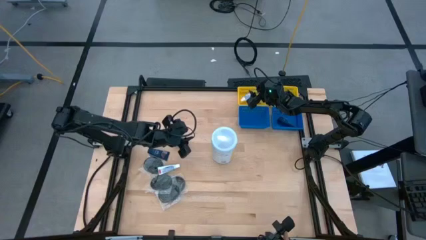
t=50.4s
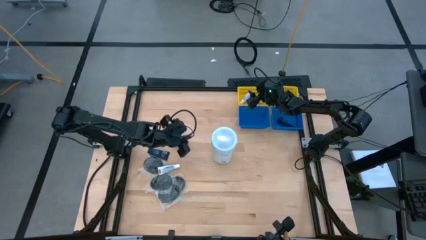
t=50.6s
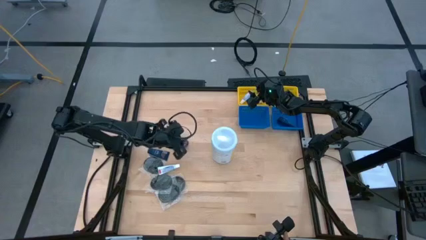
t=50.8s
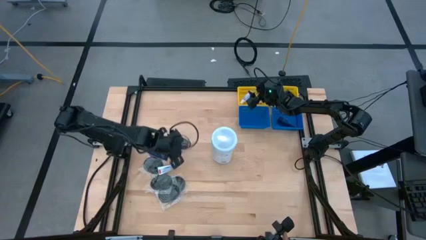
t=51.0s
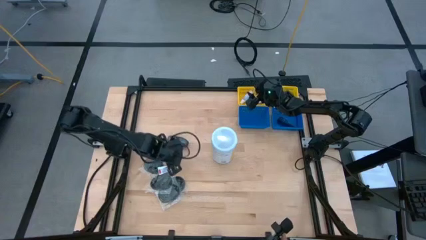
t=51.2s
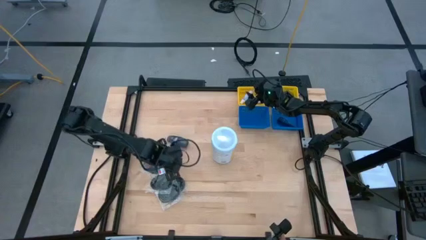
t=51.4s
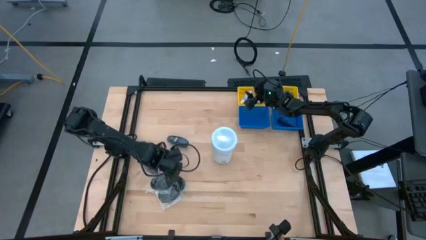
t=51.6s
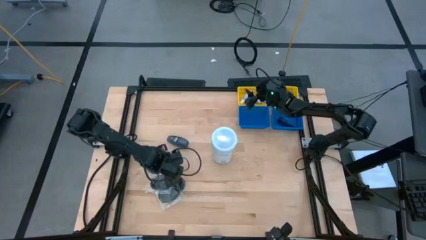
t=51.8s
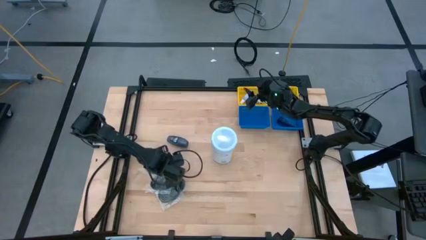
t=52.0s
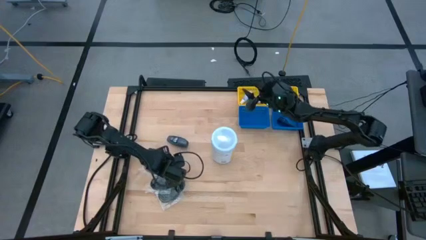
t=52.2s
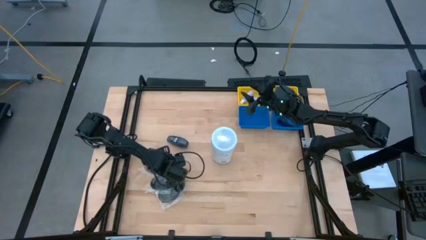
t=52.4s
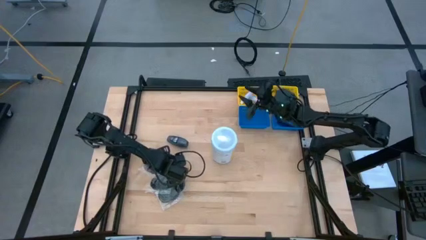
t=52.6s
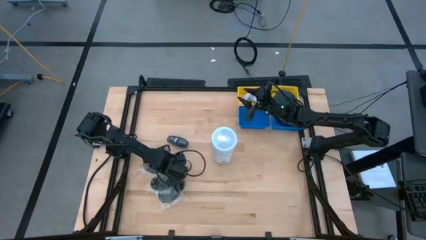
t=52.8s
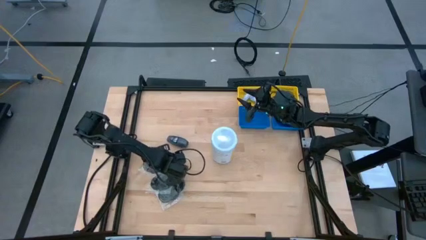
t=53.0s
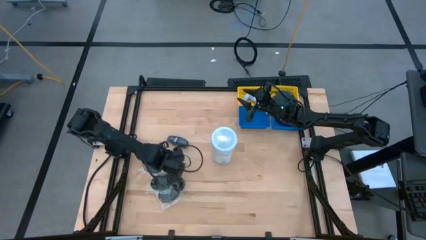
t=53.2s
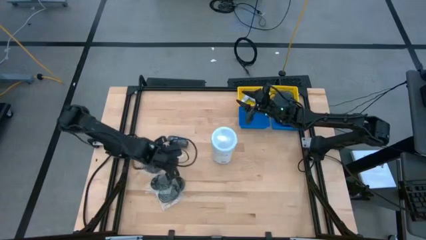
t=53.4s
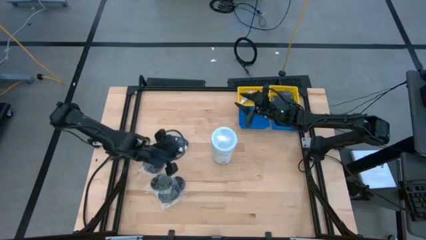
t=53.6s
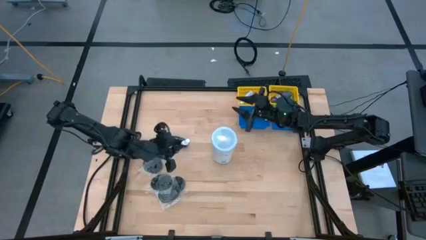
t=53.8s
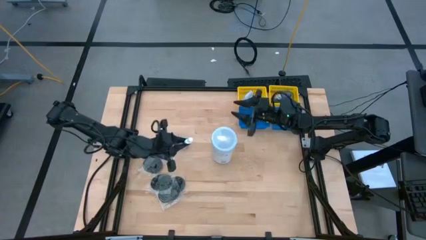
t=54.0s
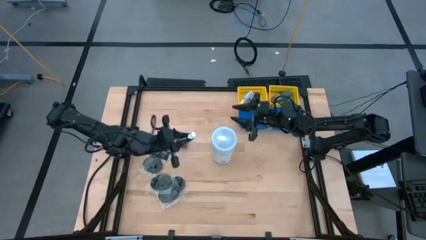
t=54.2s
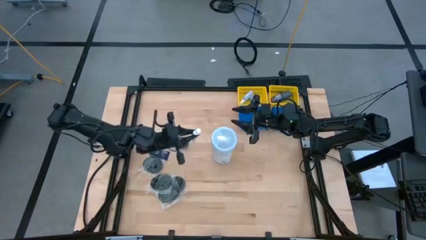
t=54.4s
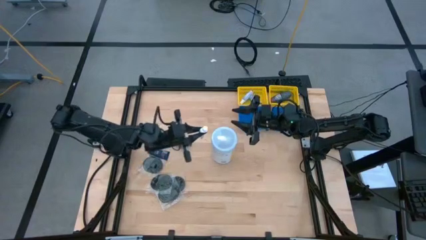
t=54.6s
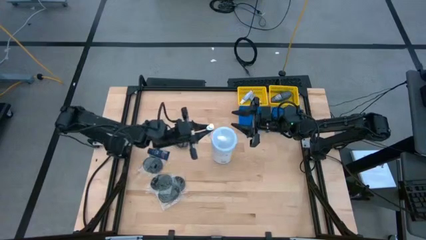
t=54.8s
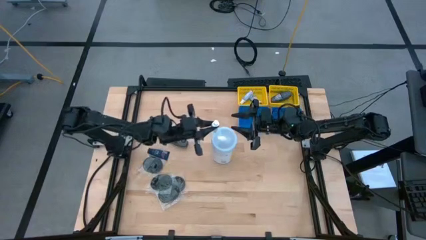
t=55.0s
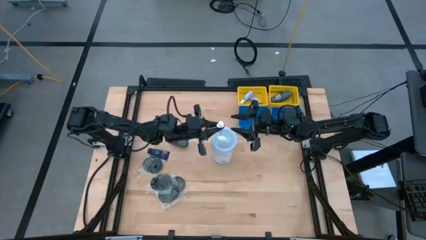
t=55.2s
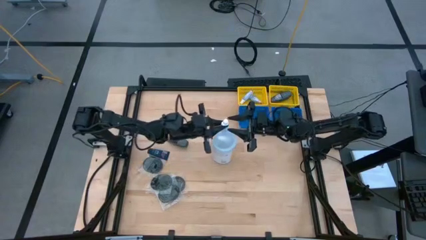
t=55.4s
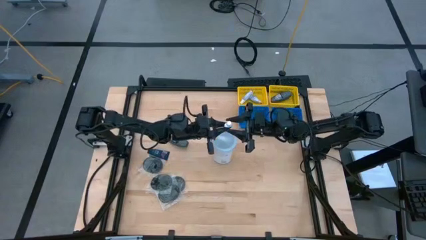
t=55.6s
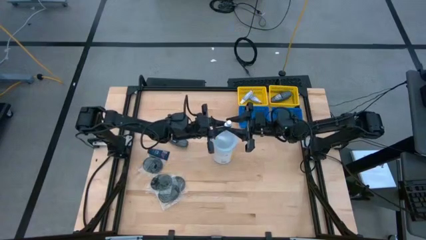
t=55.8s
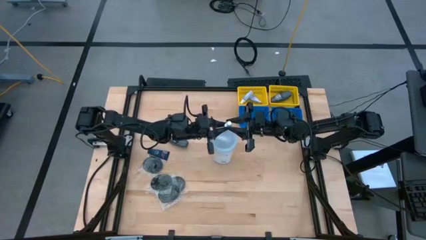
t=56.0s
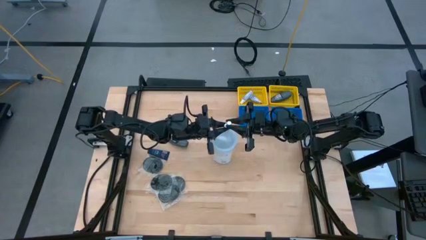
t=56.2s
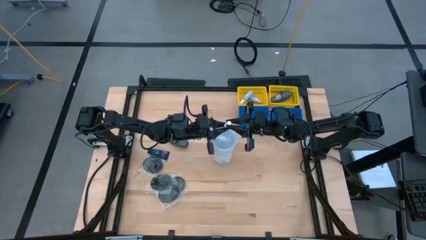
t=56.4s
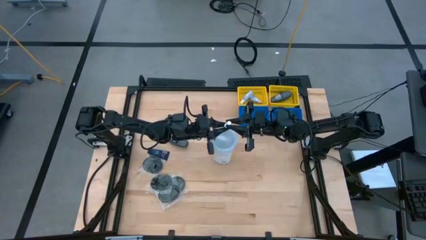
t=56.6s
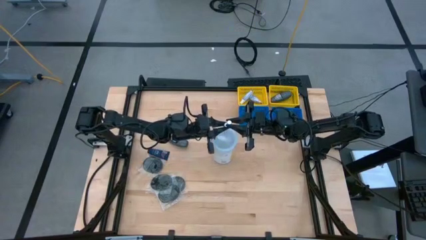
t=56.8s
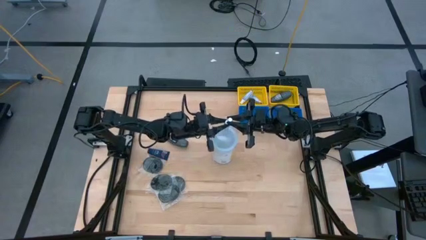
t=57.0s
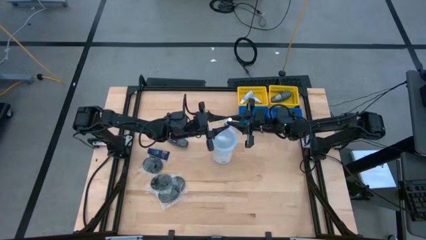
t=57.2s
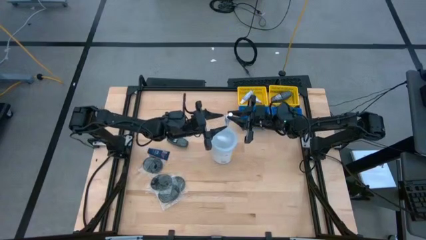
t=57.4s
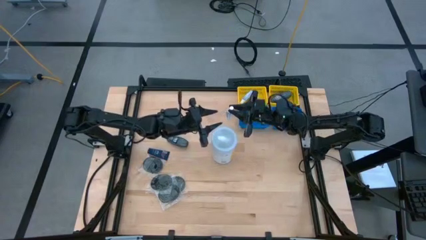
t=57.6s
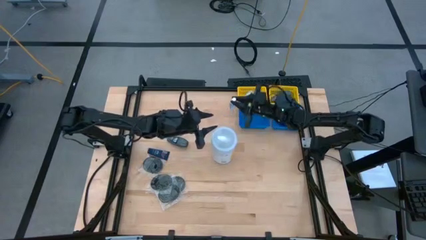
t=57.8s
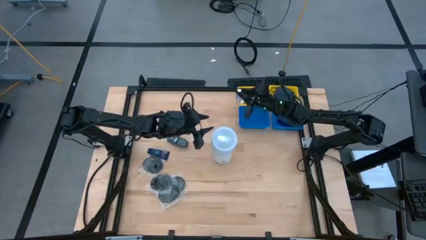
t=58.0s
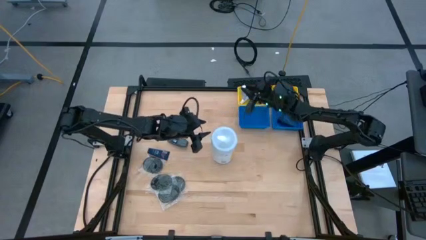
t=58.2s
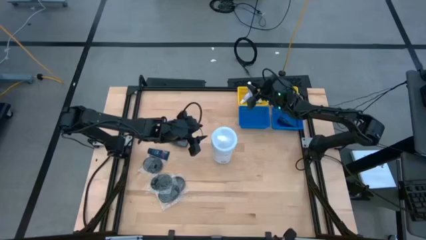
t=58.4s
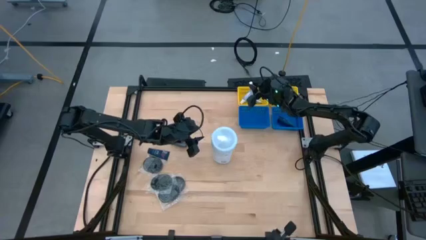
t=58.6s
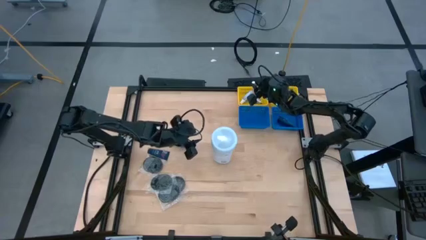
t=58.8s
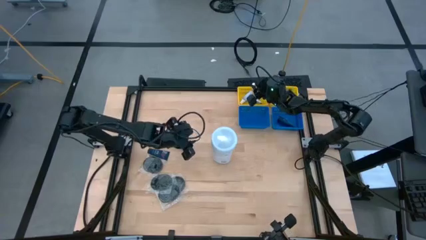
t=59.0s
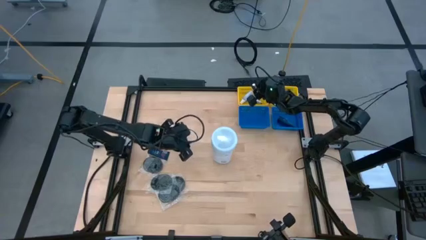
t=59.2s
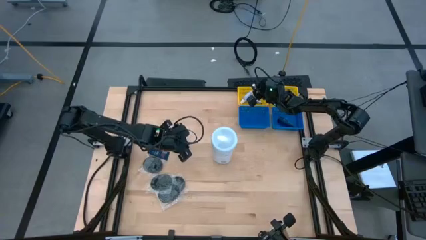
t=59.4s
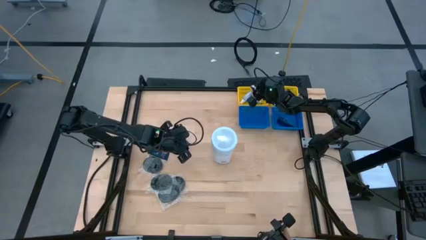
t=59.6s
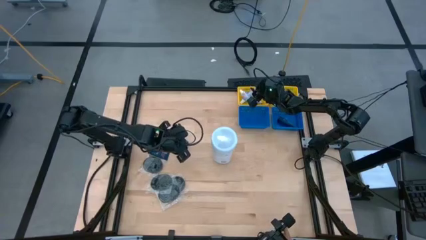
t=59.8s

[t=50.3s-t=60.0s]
Task: Pick & Place Travel size toiletries
Put the white toothpaste into the left yellow bin

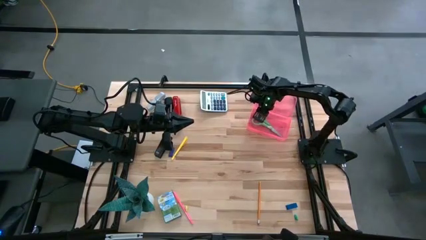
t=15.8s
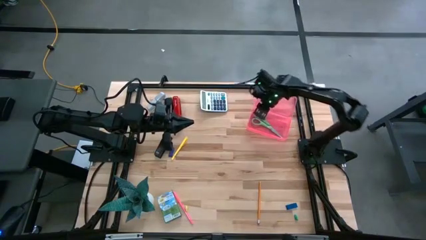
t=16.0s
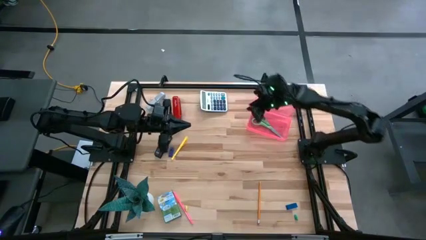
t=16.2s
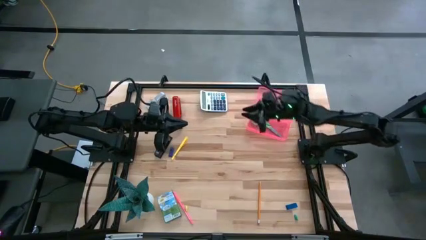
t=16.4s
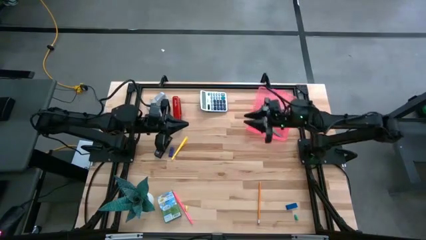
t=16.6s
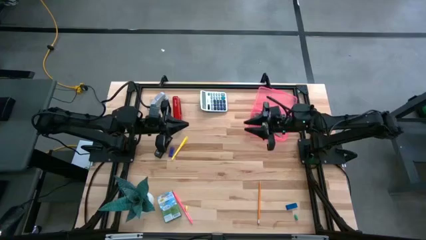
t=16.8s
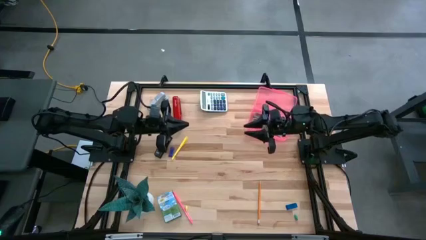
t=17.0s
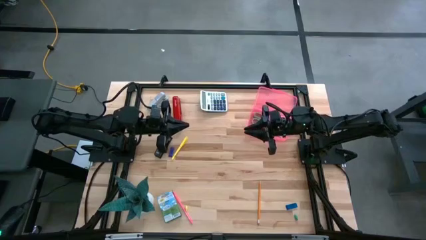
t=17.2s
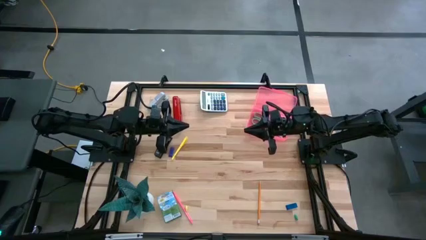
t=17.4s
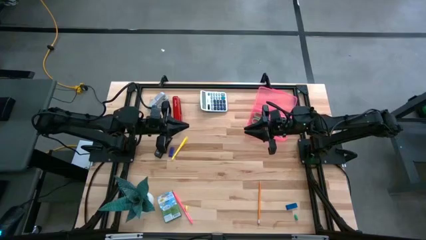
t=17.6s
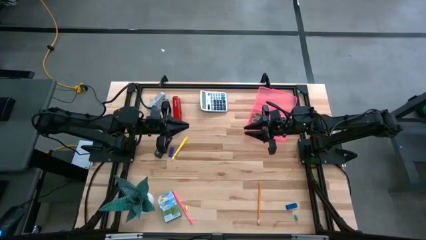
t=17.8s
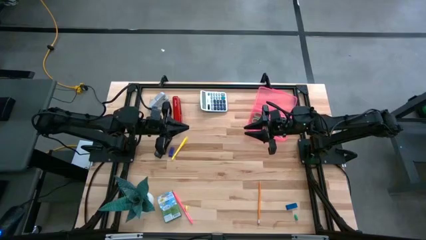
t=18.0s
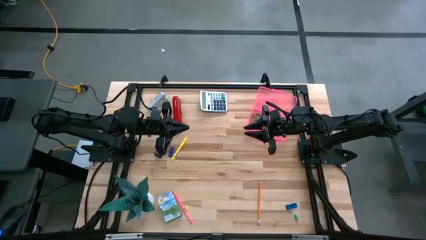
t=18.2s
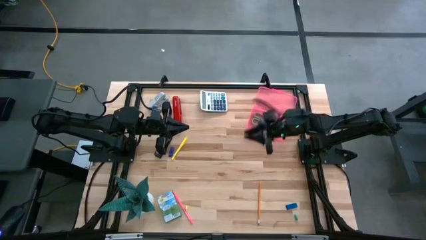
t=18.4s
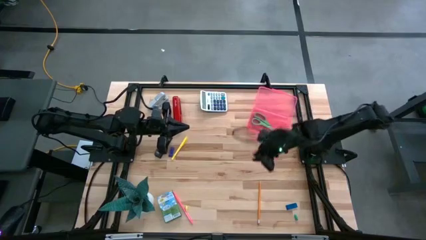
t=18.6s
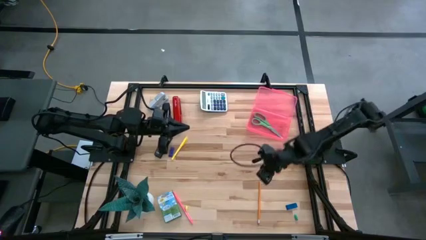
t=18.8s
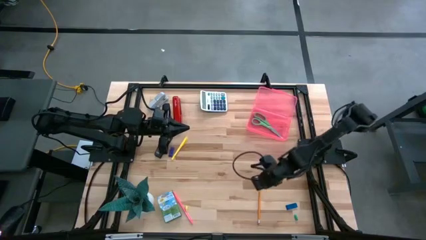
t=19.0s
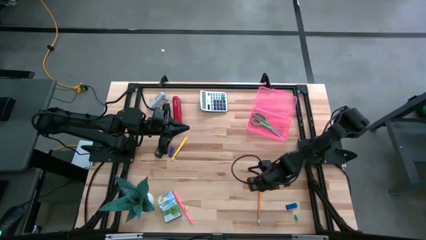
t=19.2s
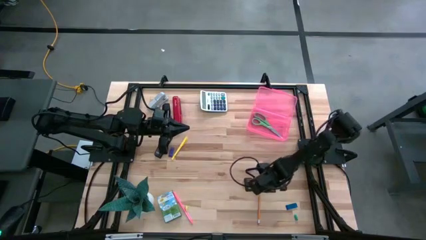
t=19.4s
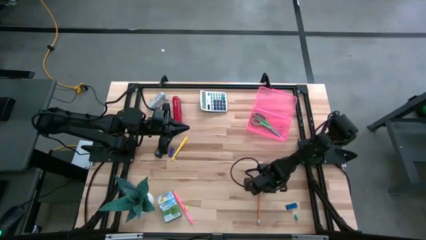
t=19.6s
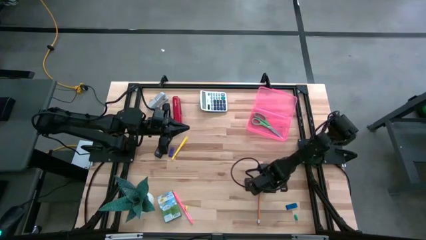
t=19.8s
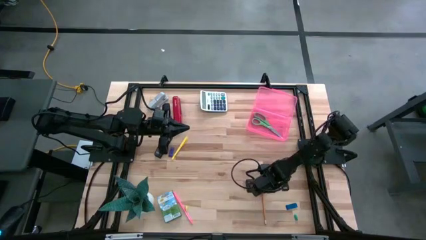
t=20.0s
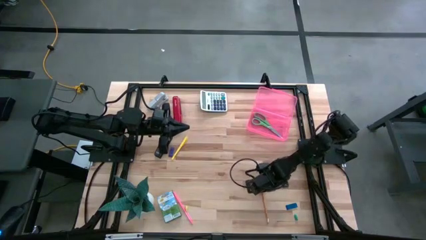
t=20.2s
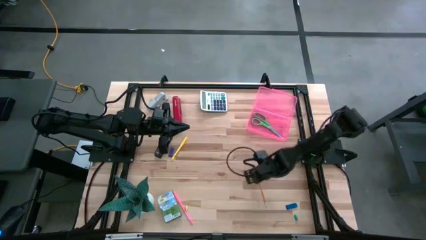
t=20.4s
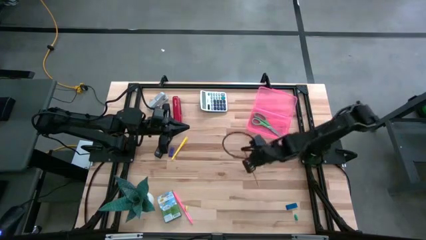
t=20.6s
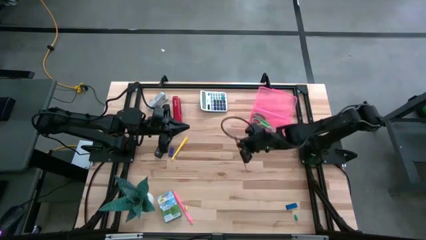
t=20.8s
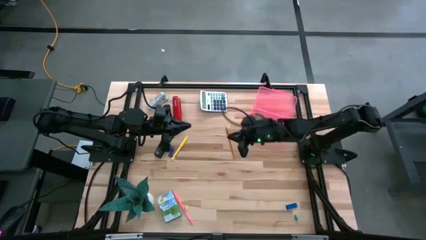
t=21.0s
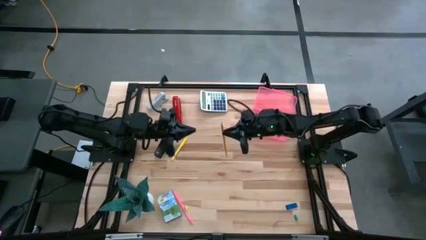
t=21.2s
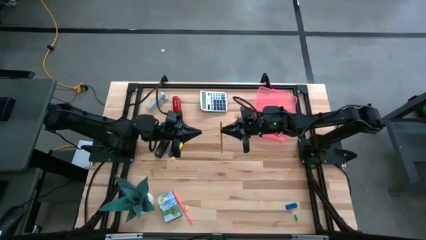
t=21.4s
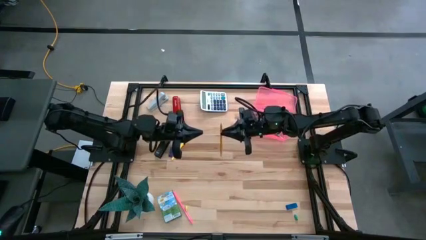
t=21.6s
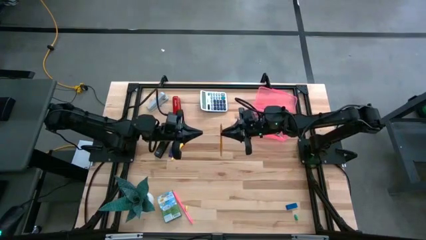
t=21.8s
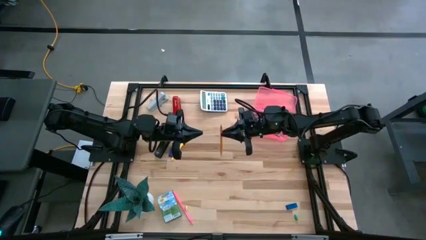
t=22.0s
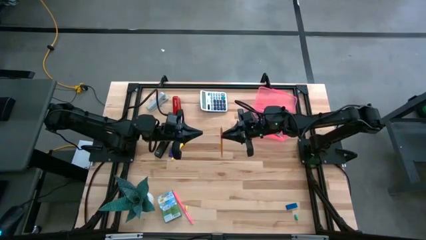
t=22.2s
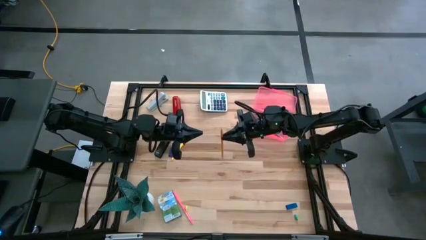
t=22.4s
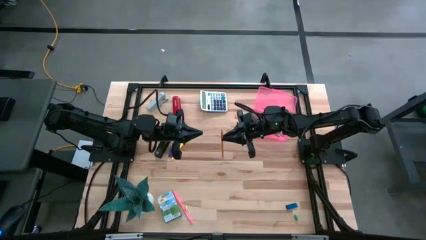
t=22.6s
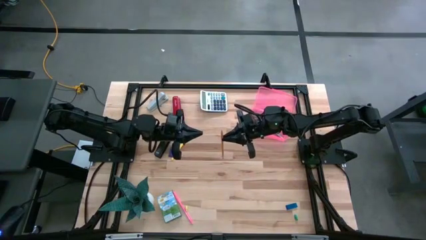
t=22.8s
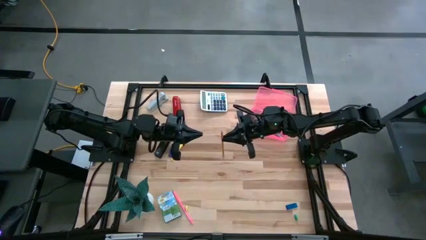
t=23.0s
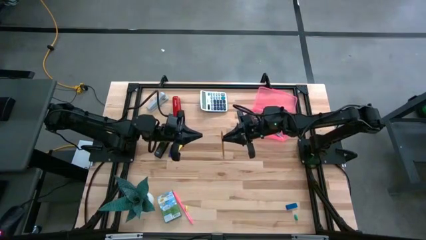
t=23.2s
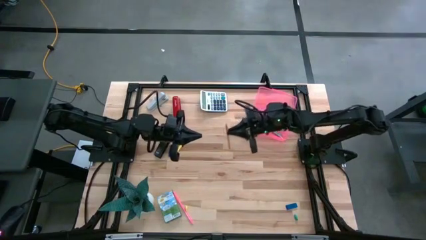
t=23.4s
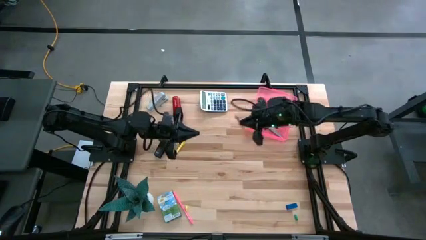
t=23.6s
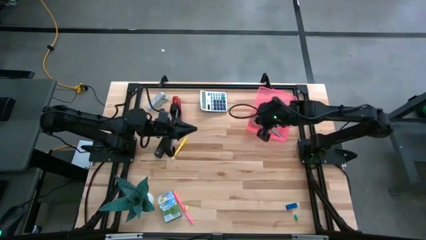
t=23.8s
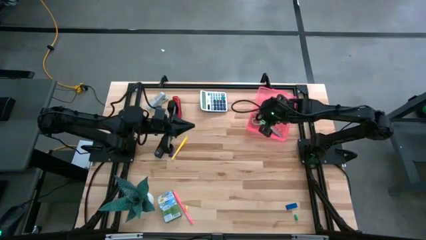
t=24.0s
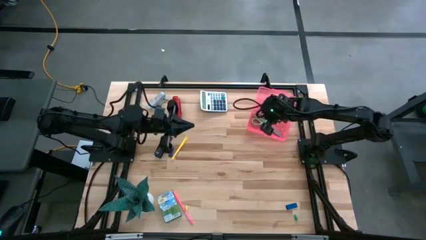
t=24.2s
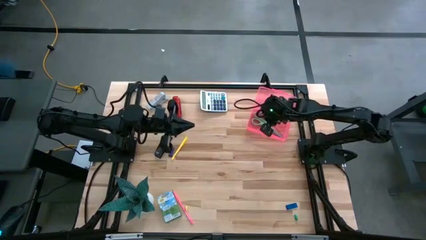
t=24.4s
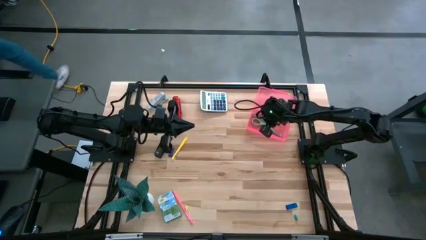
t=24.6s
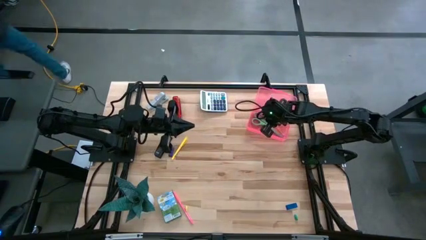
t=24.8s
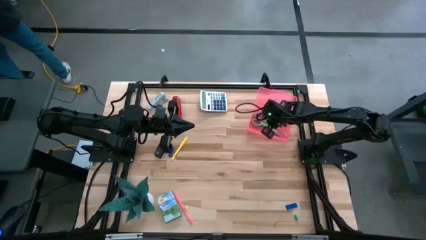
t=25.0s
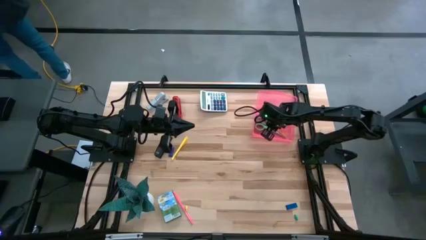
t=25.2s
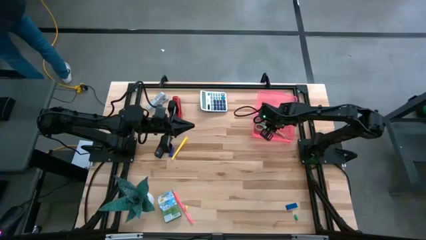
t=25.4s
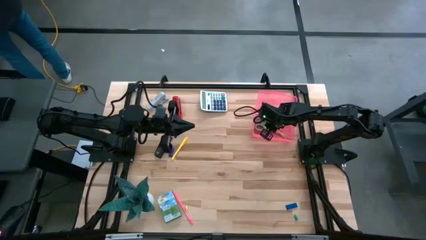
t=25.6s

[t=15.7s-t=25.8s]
Task: Pack school essentials
Put the yellow pencil into the pink supply box
